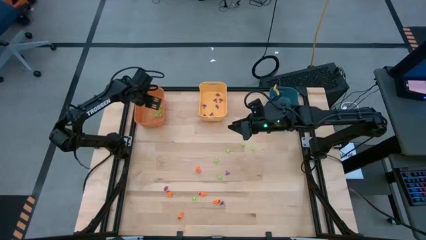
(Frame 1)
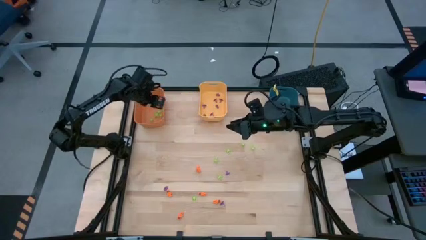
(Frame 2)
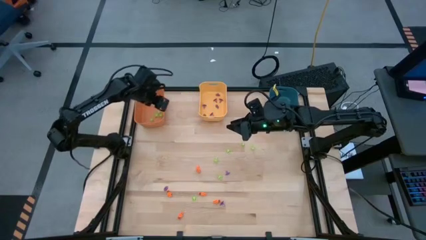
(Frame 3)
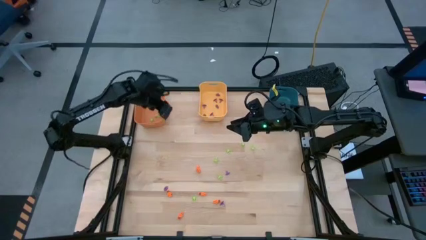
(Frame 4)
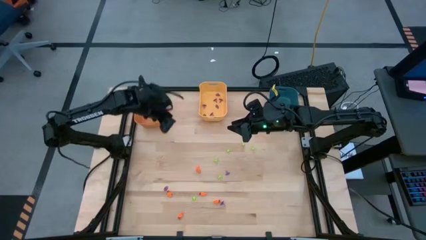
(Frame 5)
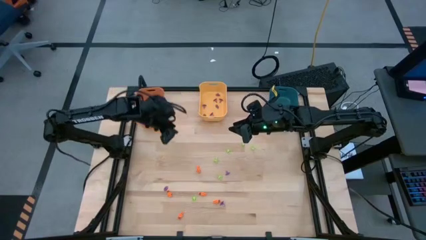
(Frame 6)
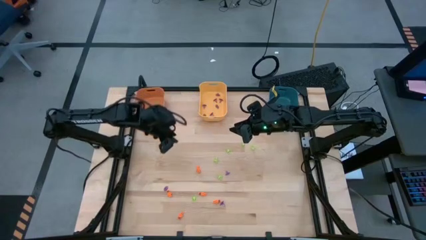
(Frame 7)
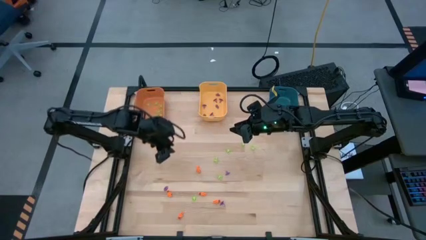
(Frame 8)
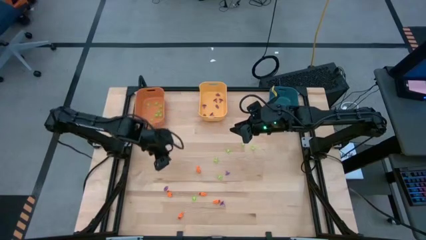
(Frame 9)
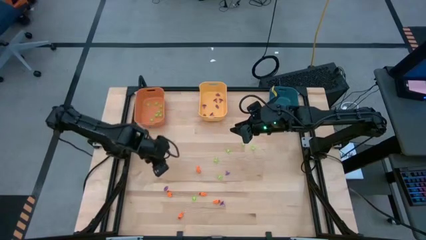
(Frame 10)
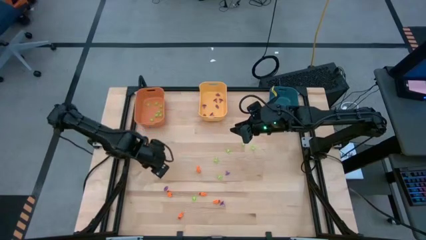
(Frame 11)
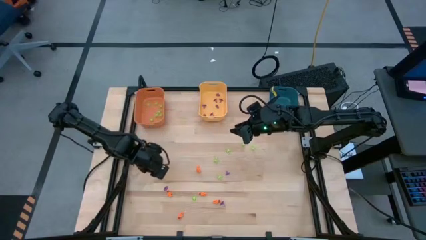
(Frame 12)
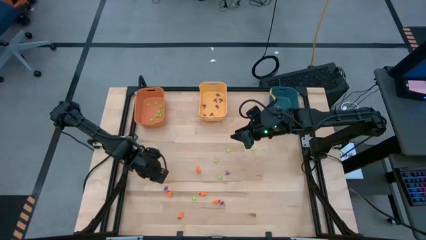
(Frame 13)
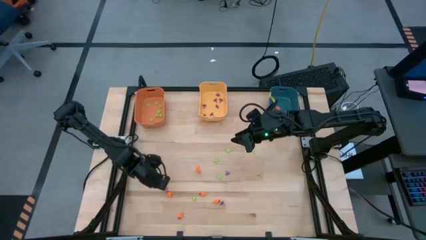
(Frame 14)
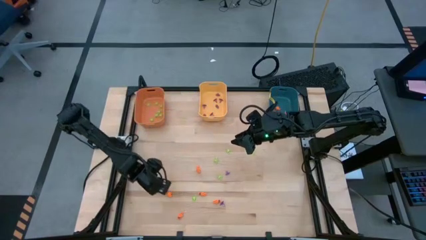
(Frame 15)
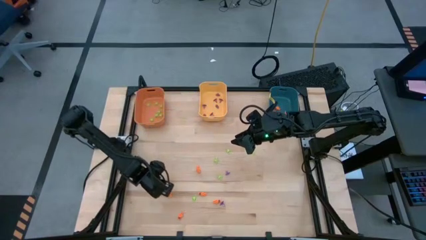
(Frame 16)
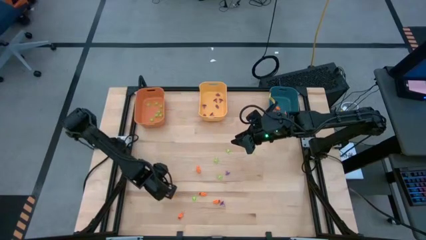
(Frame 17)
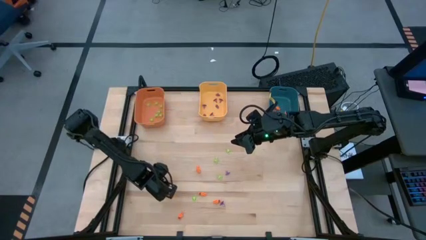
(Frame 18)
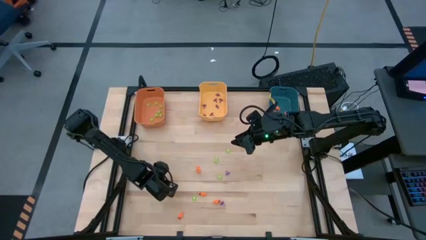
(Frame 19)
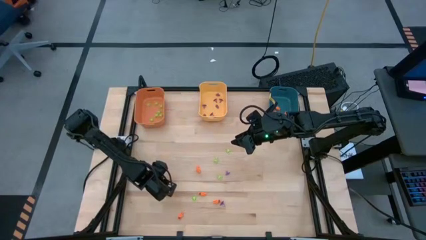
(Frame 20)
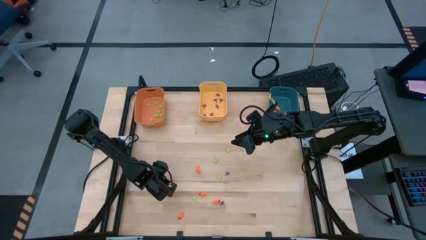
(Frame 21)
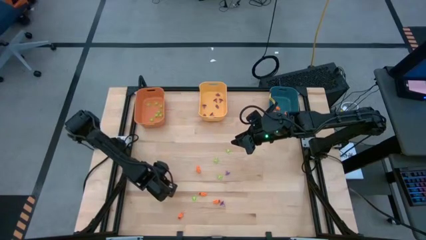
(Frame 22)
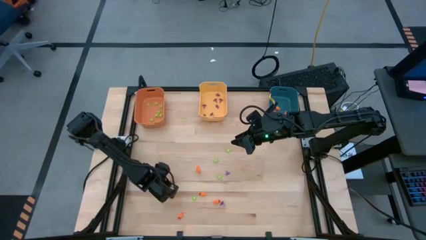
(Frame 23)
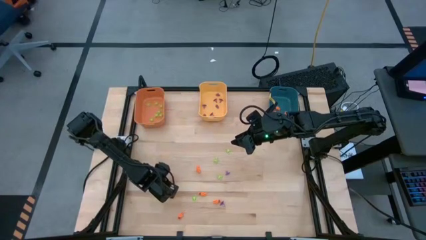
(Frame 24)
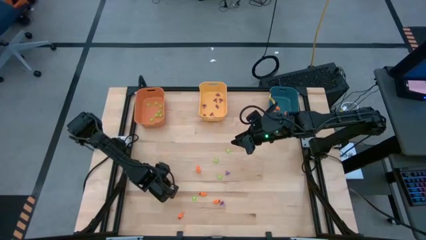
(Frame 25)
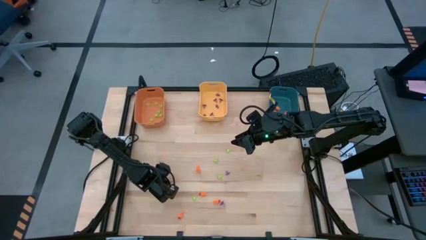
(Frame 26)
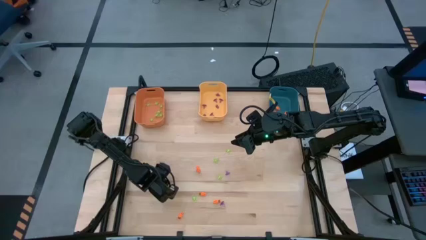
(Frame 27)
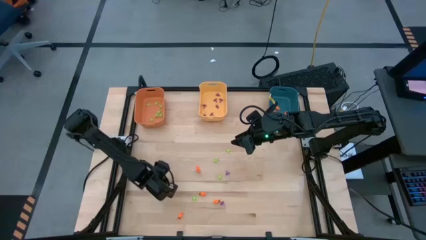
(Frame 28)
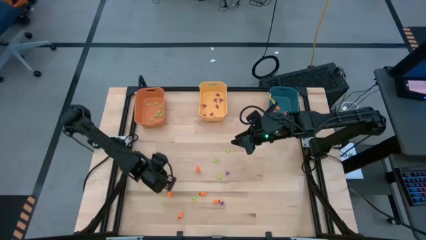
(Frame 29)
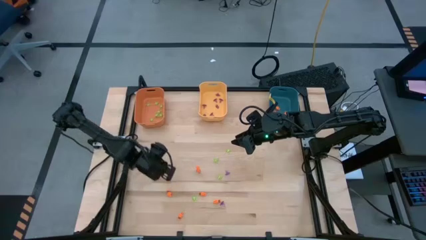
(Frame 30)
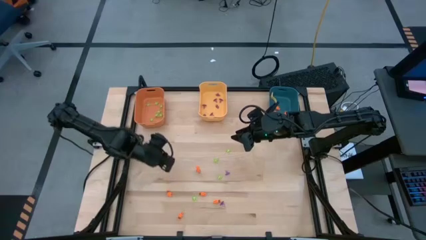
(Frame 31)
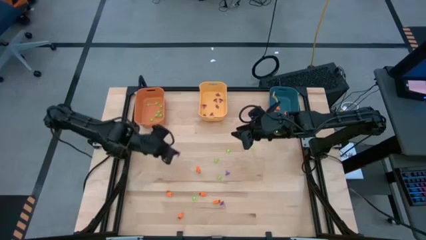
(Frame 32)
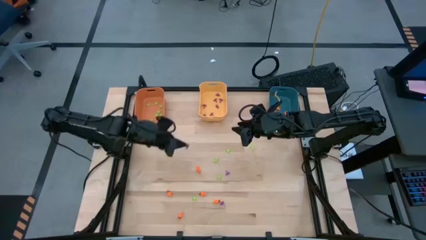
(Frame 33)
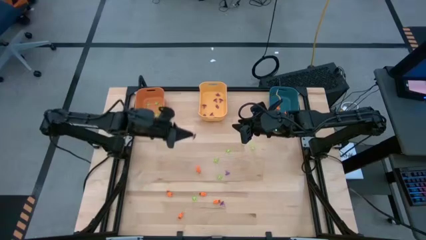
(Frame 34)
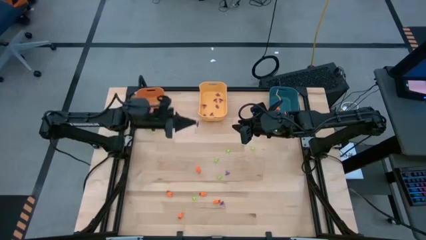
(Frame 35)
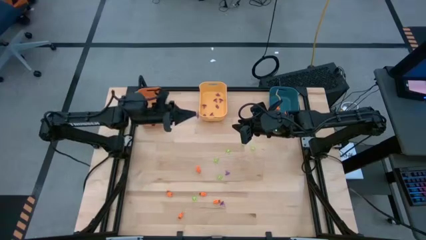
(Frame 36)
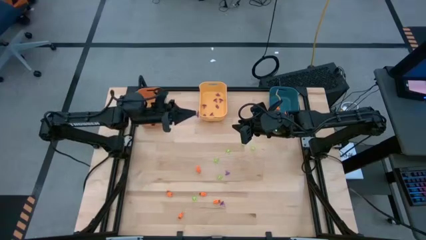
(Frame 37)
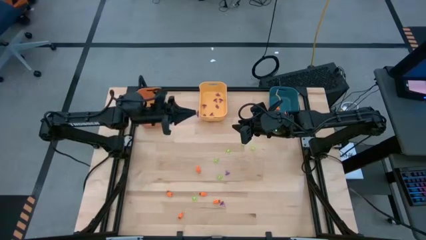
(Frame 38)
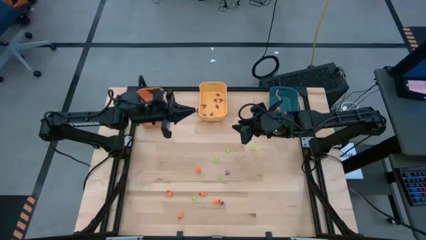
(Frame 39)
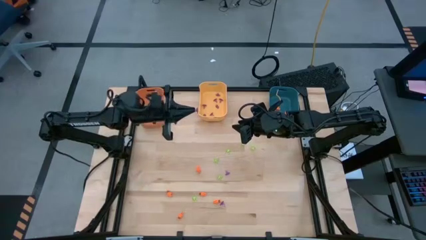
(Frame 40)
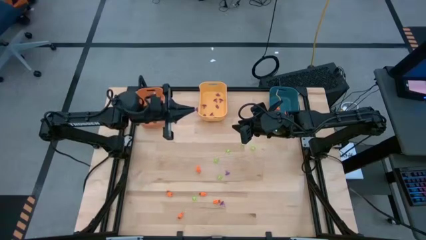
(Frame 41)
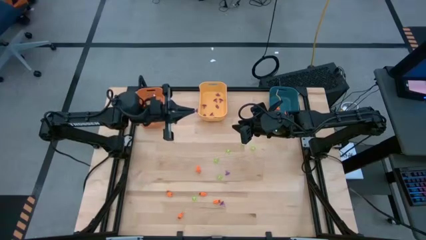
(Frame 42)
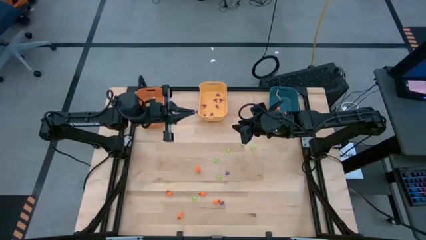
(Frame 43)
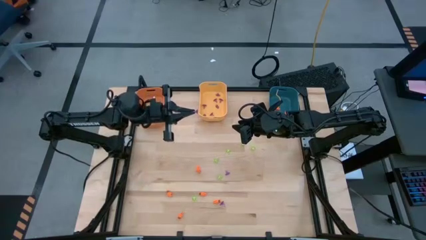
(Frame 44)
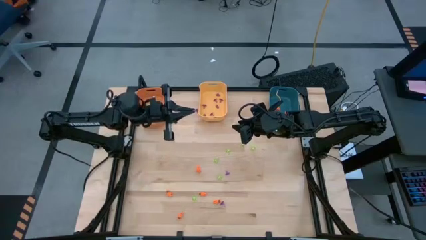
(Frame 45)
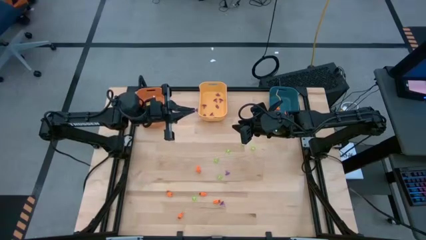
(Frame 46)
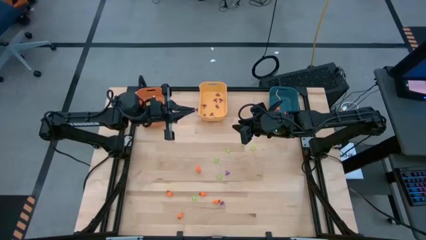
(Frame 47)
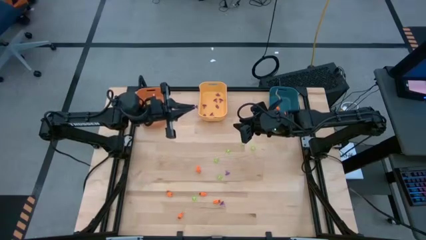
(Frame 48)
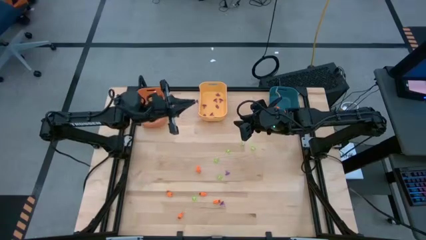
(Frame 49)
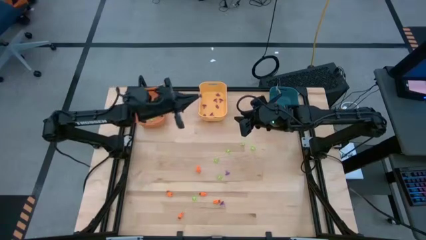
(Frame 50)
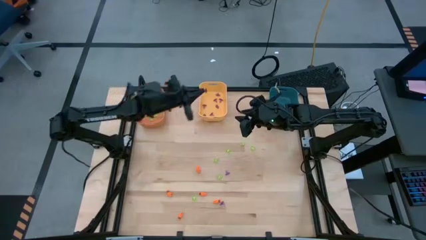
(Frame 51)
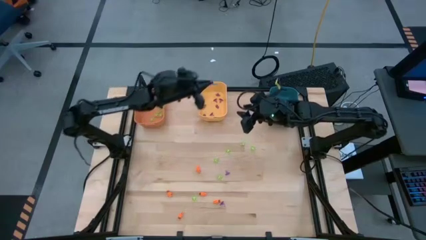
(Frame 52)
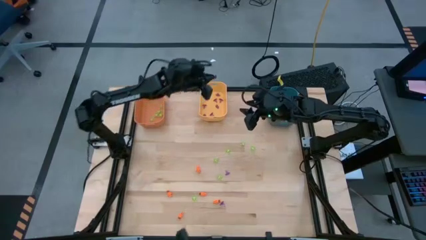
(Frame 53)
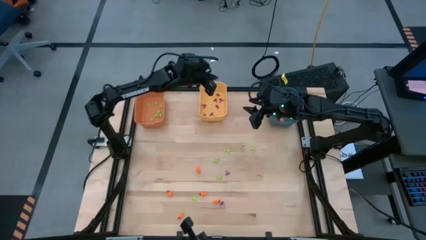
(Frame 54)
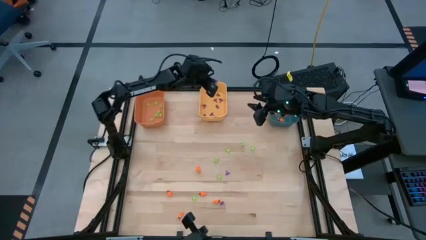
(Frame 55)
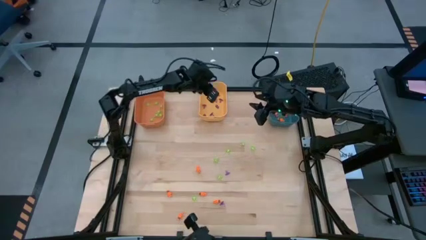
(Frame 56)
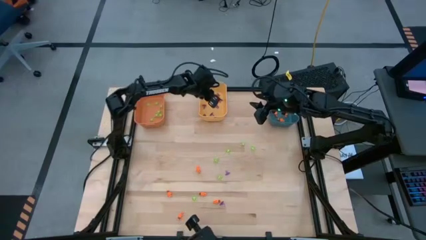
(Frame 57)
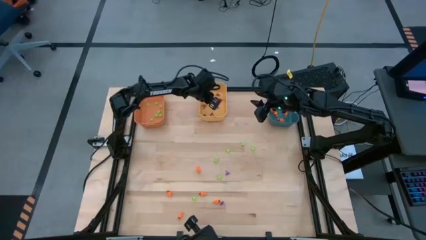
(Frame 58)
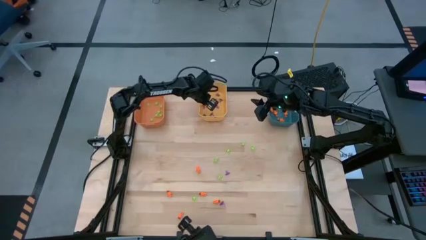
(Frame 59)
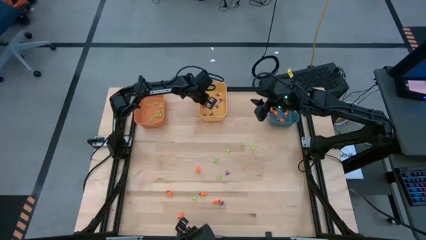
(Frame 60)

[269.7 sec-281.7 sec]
Task: Sort Halloween decoration
Put the purple witch hat toy into the yellow bin

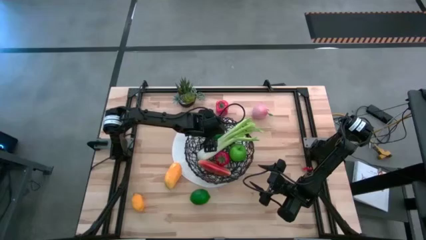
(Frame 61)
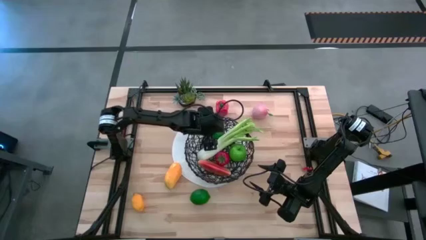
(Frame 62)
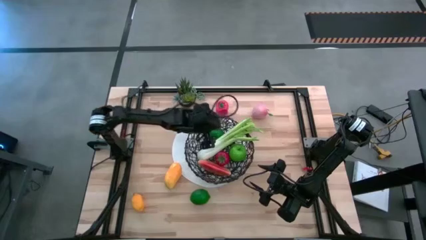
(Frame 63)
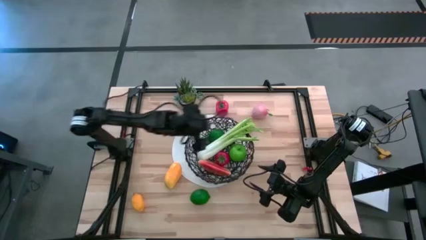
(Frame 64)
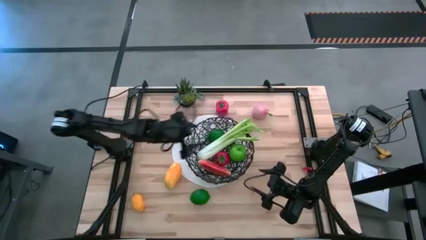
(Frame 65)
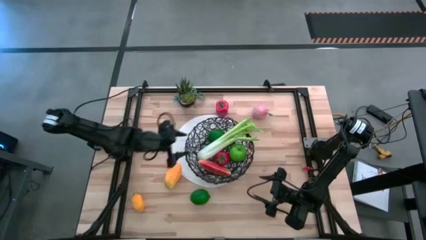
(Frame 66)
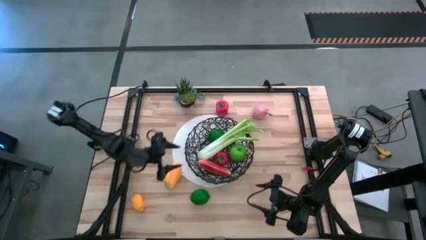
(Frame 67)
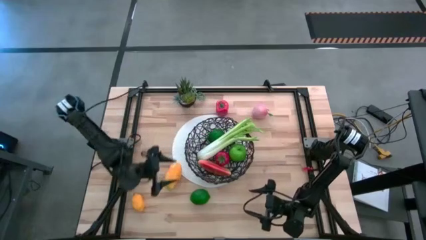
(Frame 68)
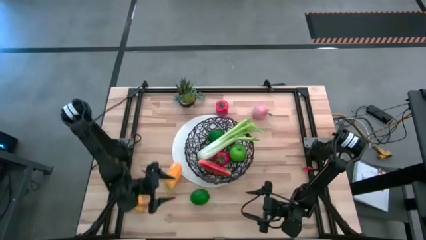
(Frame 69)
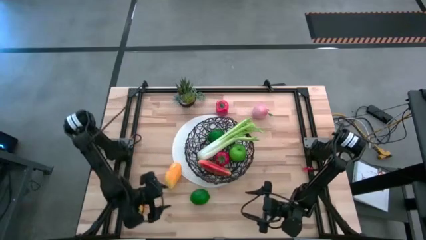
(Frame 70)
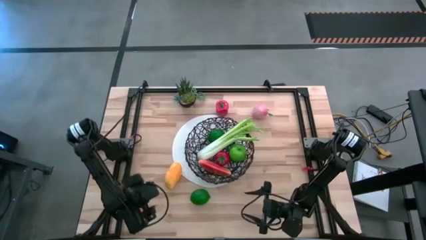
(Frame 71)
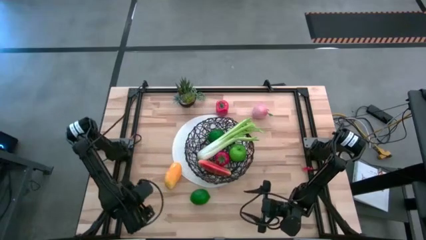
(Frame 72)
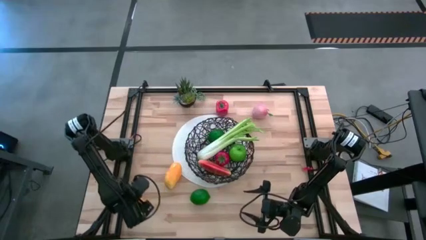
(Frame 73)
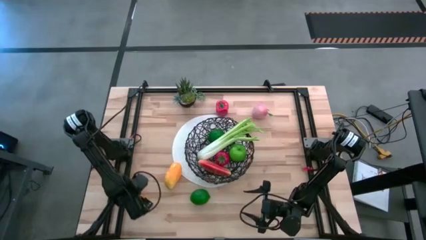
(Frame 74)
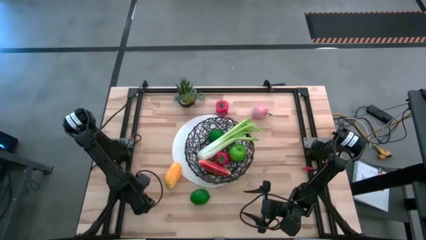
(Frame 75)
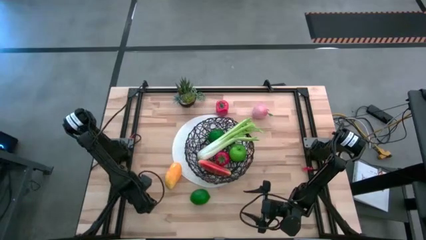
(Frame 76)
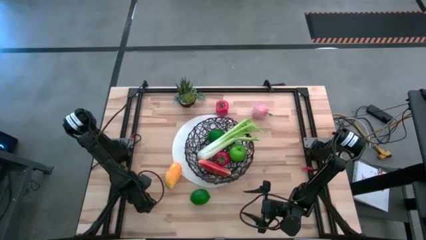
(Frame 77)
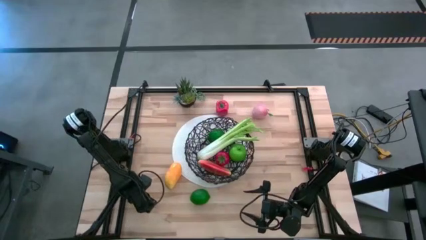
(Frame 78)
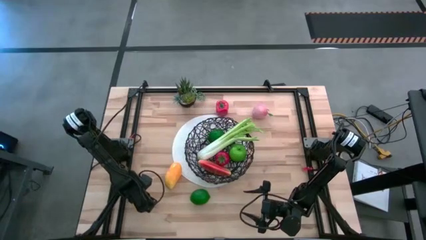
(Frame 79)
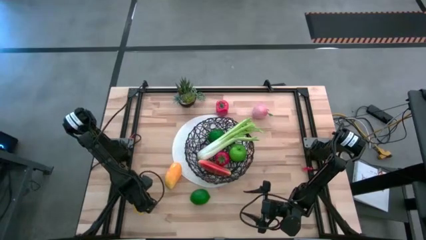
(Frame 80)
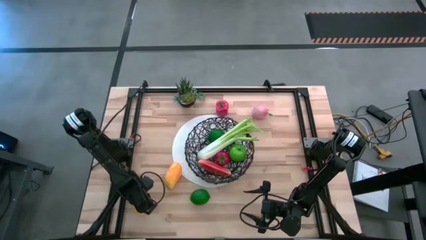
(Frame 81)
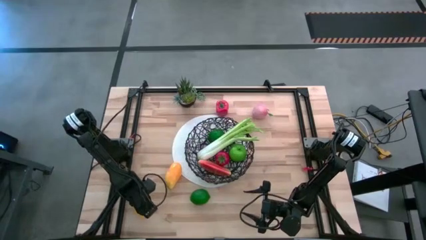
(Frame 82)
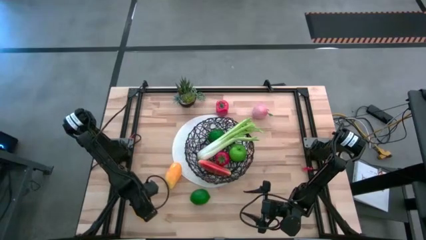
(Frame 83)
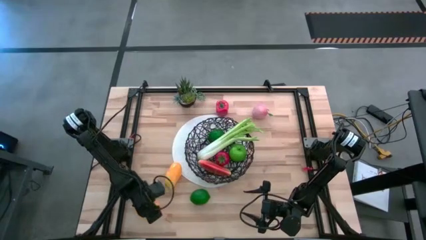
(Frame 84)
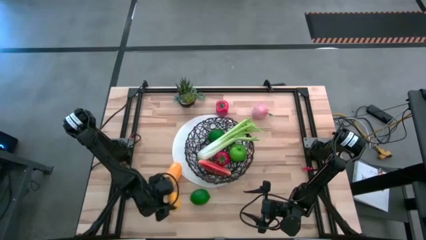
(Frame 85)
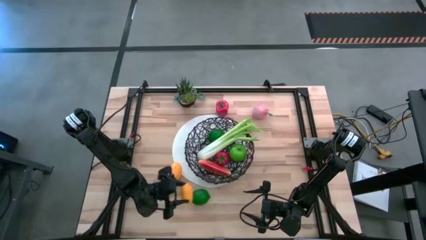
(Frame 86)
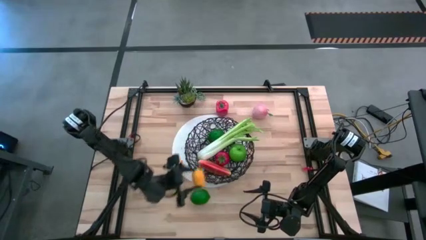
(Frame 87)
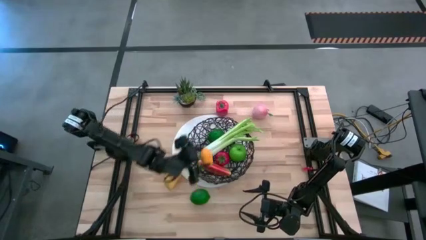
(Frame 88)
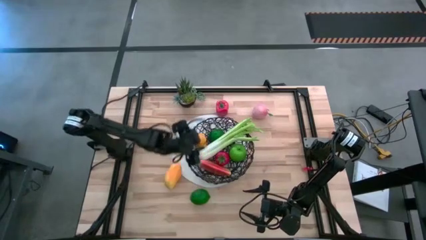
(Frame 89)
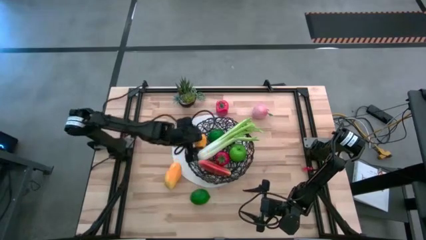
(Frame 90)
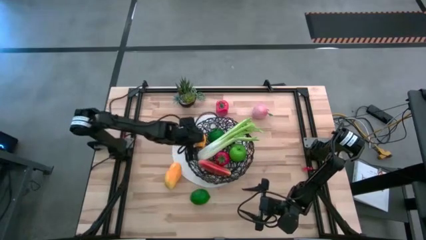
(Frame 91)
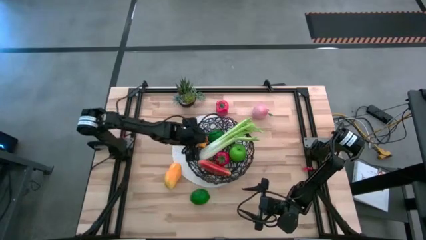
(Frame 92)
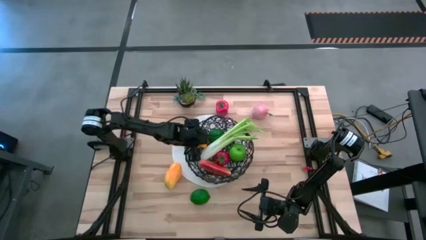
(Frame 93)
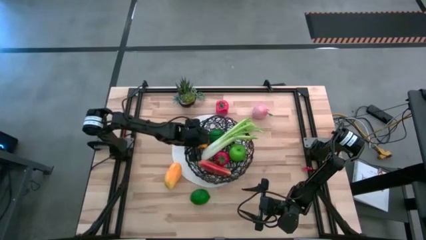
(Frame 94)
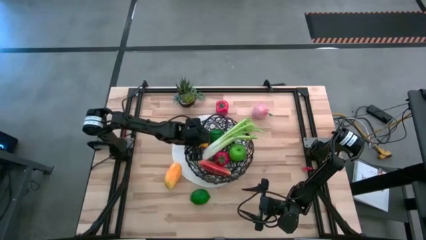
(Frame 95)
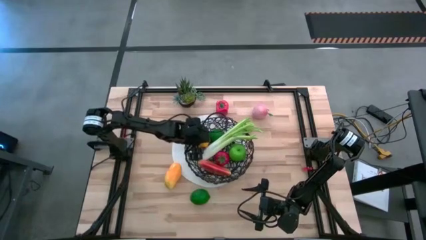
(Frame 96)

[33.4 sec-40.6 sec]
Task: Build produce basket
Put the yellow lemon into the wire basket
